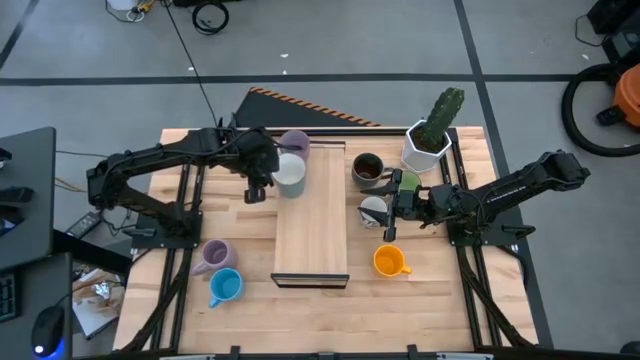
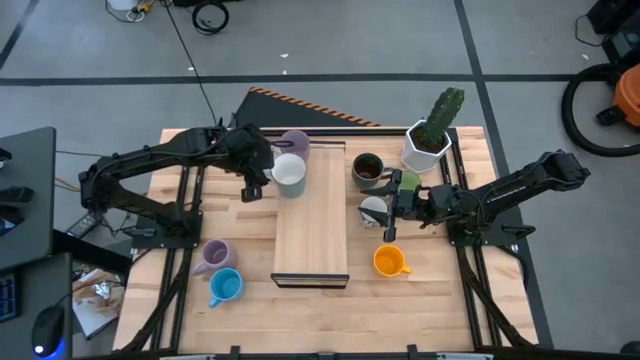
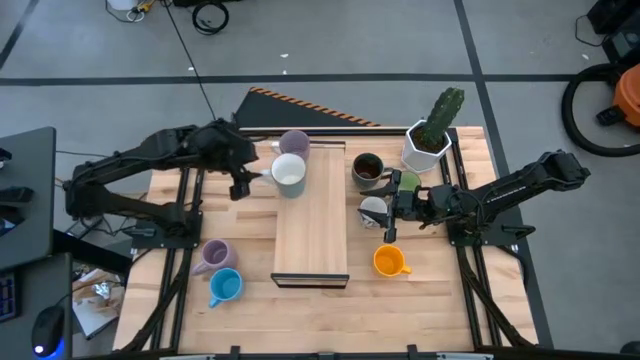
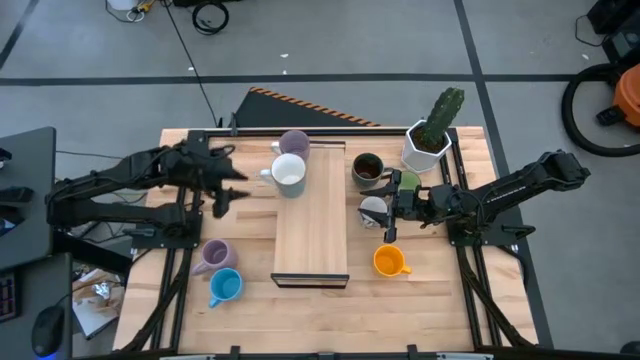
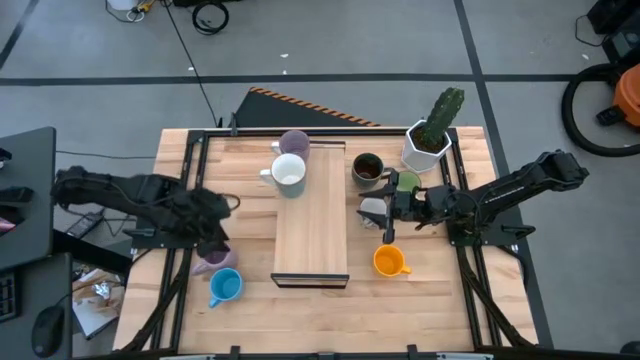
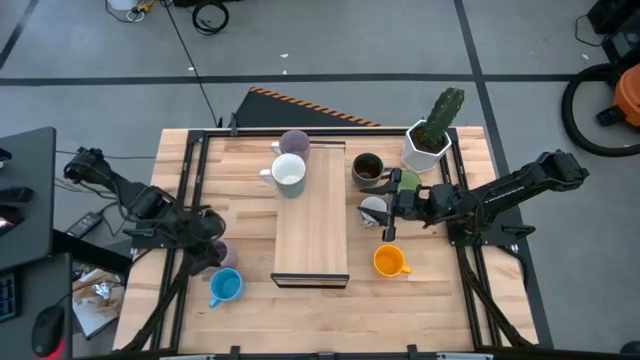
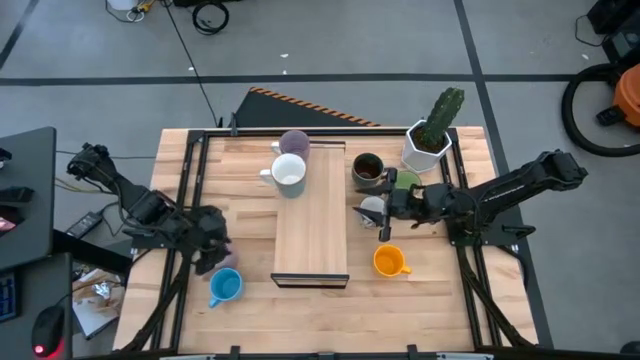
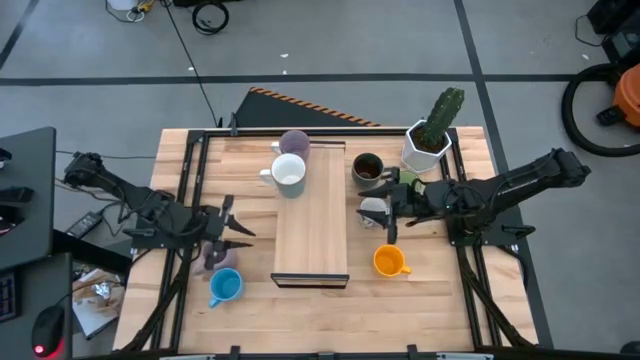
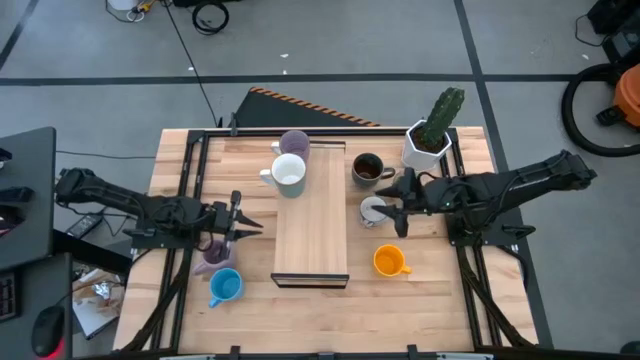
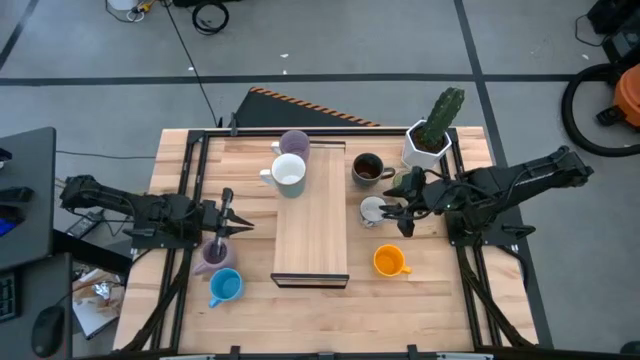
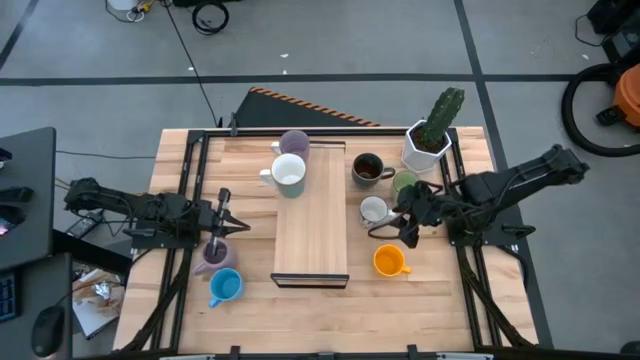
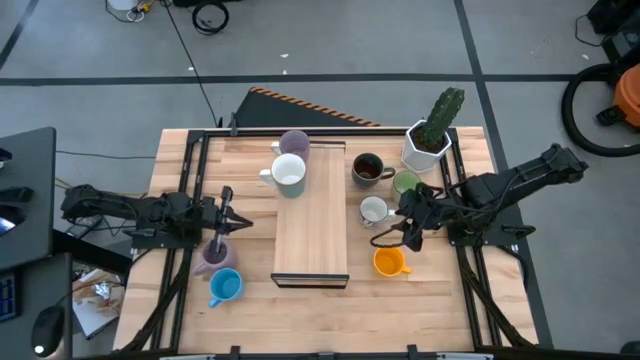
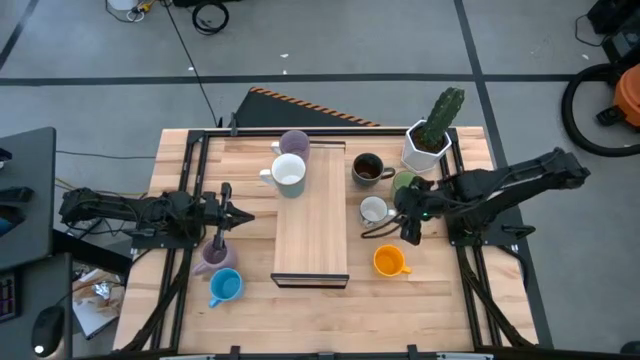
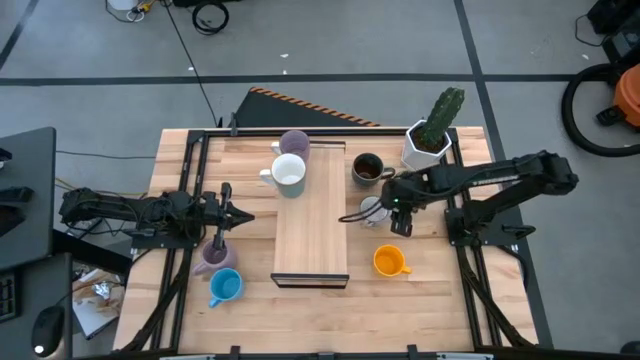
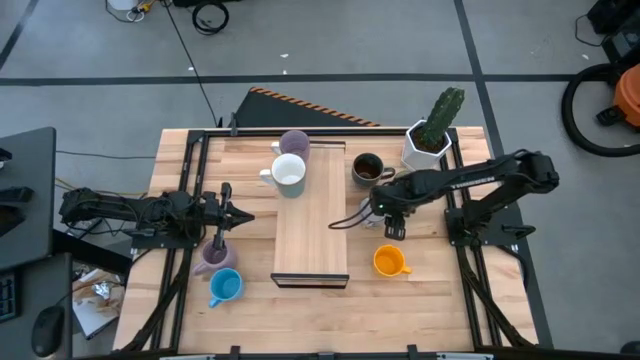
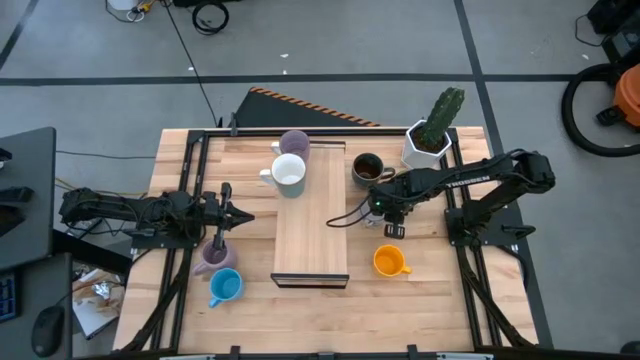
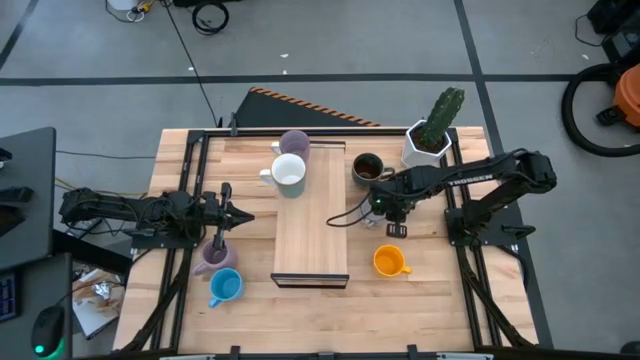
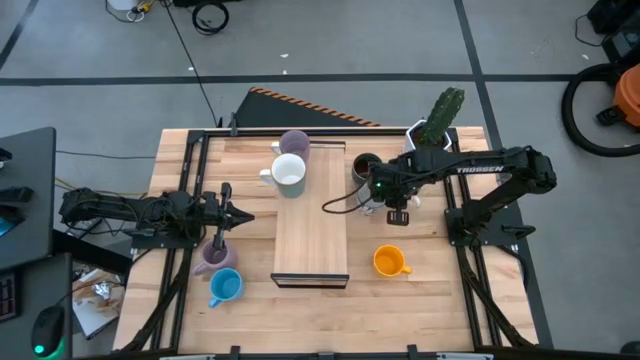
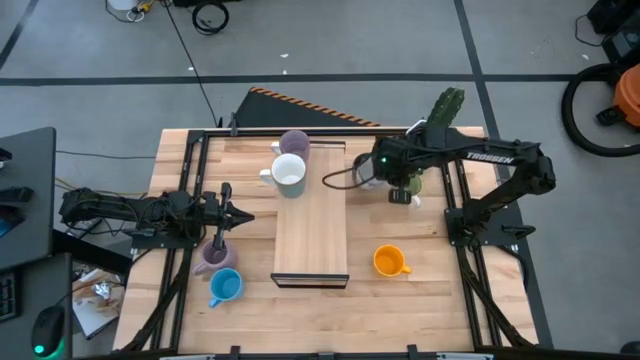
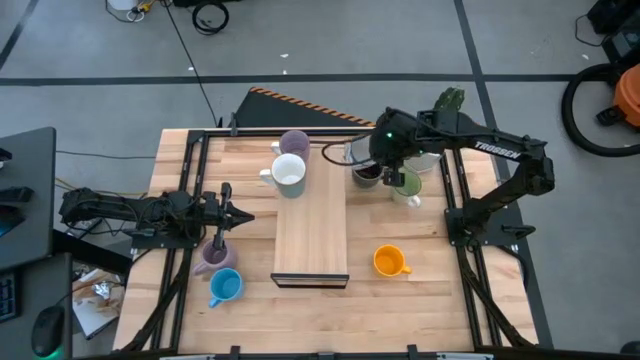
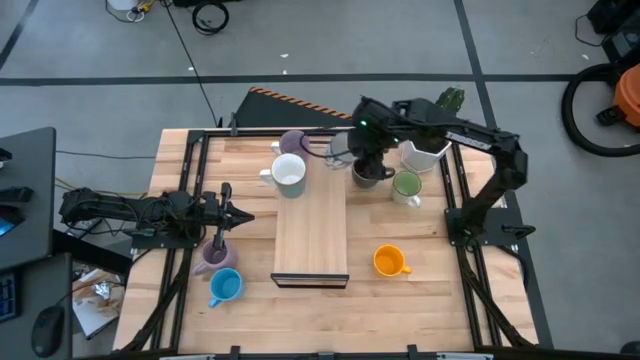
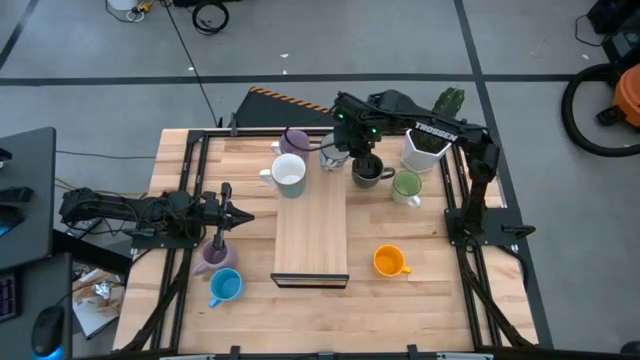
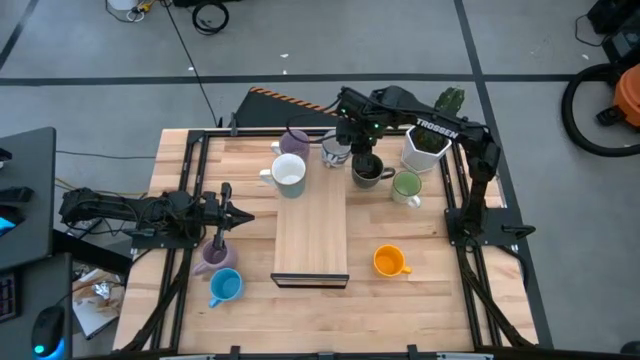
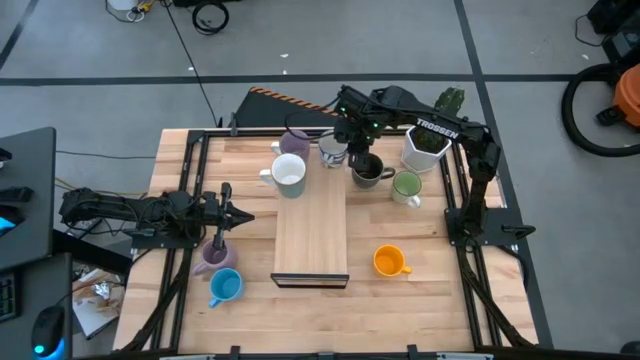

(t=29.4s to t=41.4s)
Task: Place coffee mugs
Put the blue patterned mug on the shelf

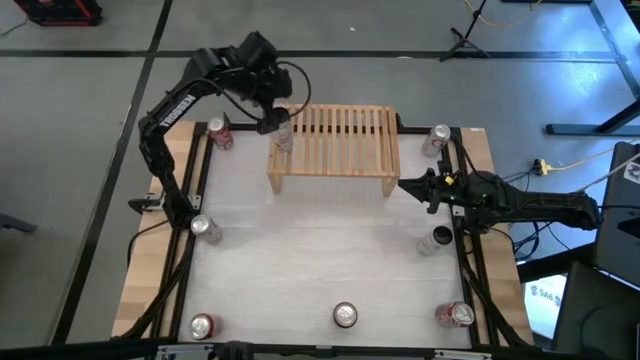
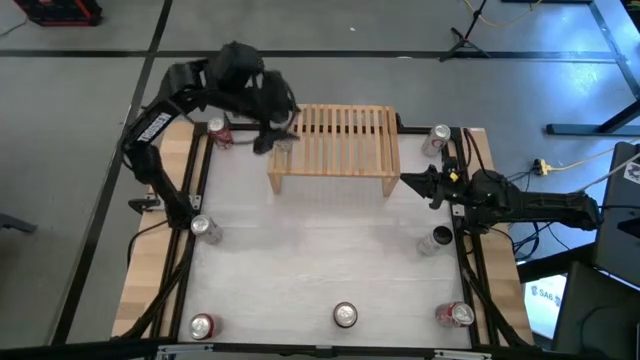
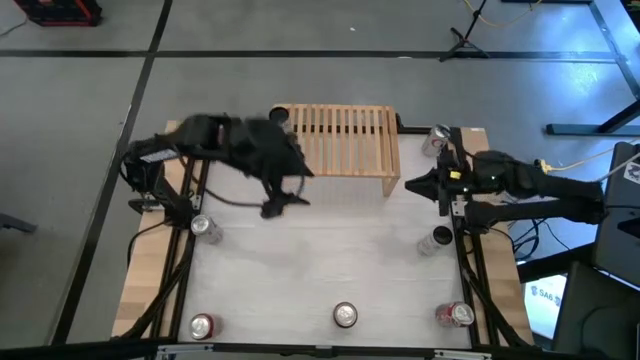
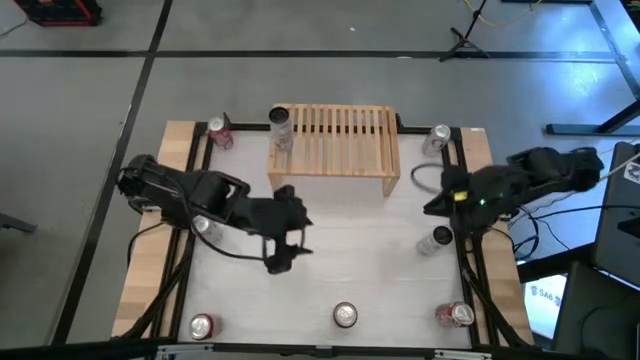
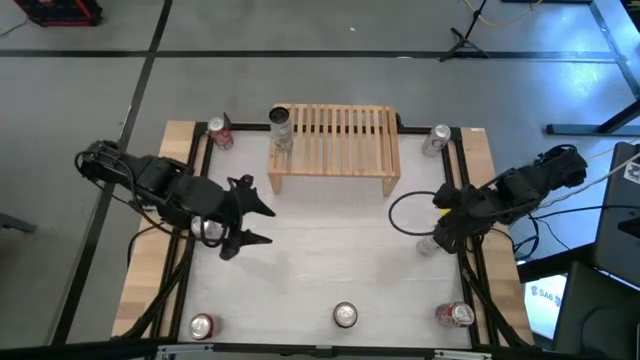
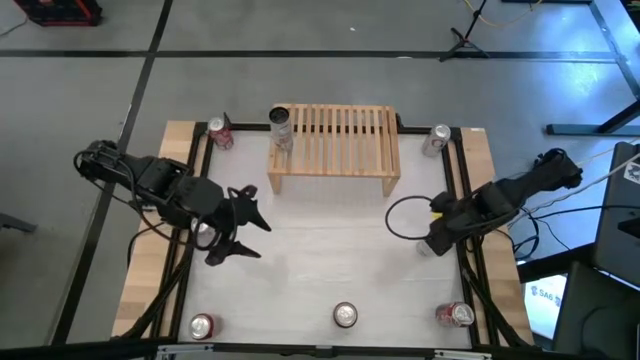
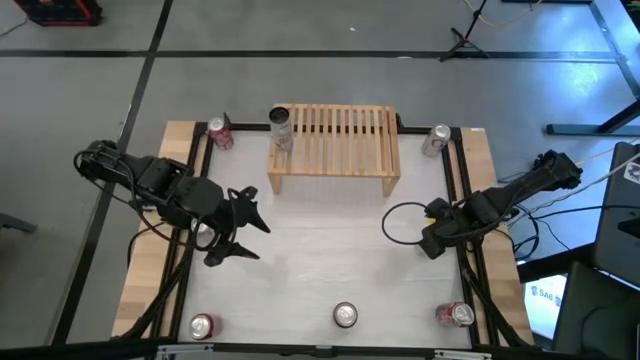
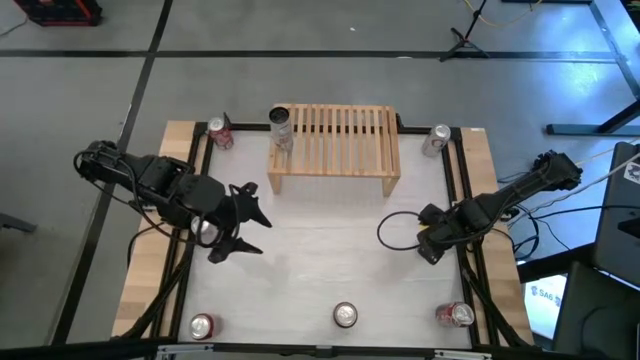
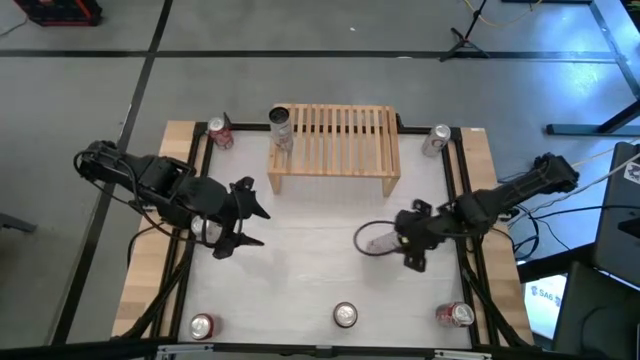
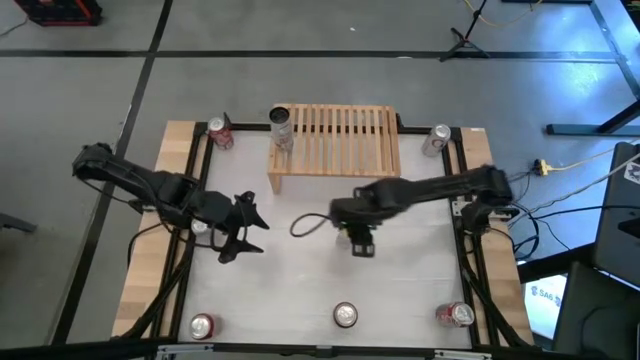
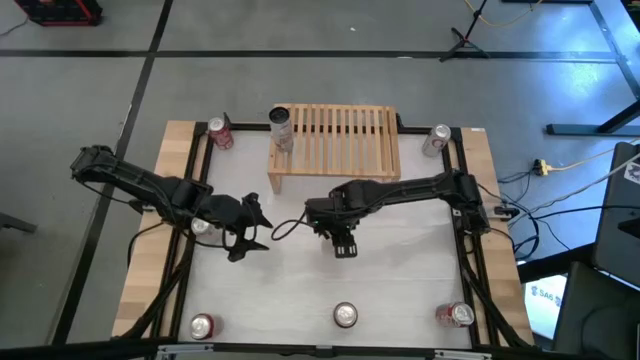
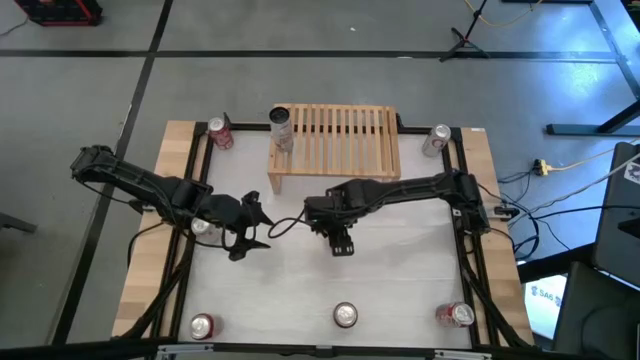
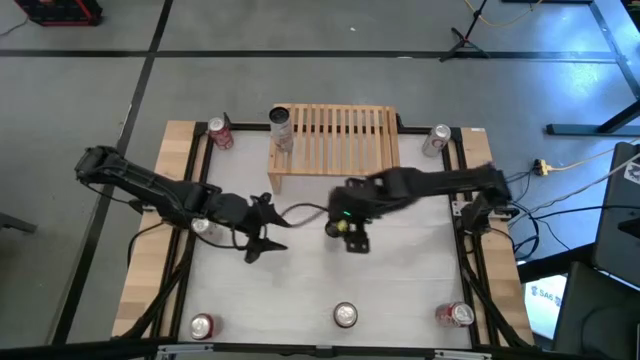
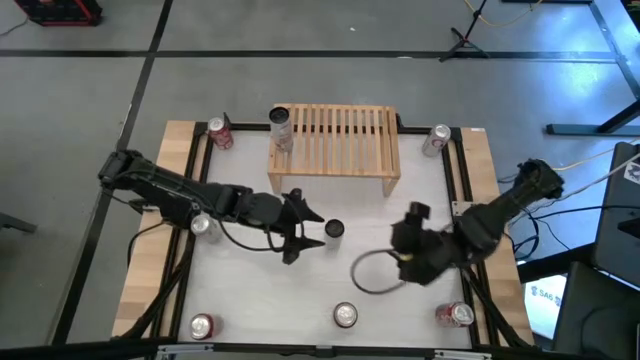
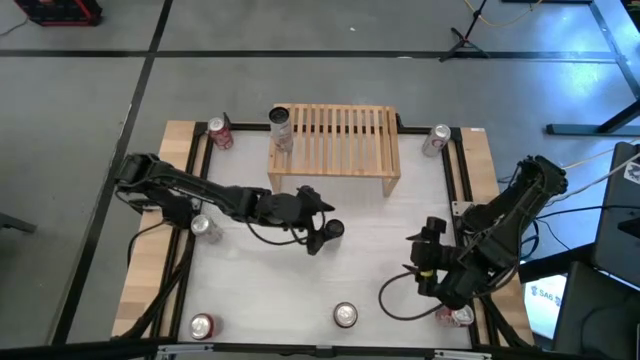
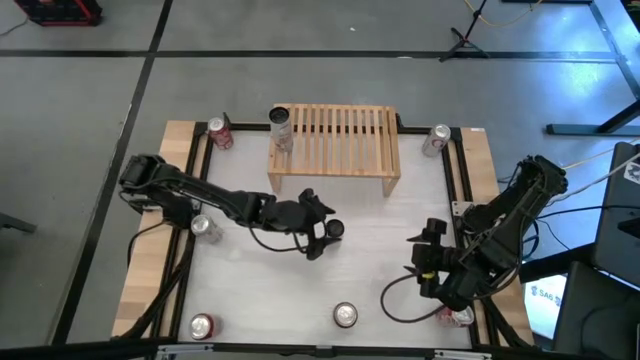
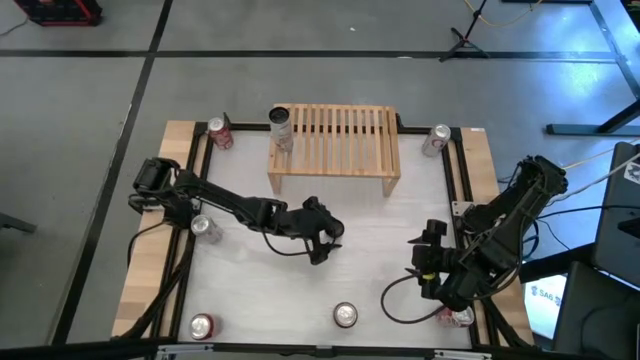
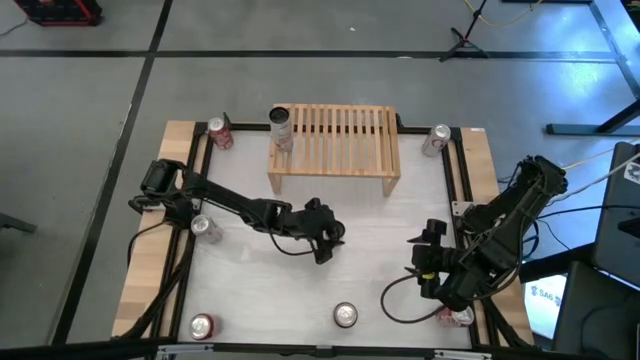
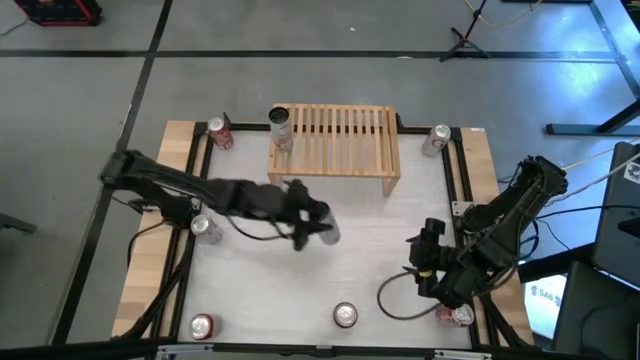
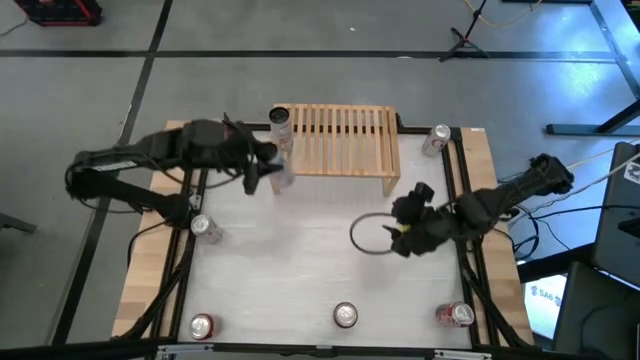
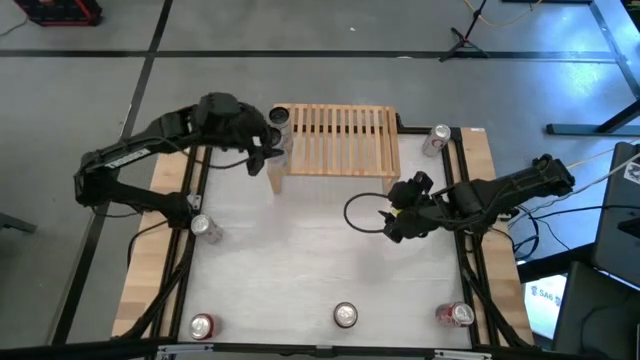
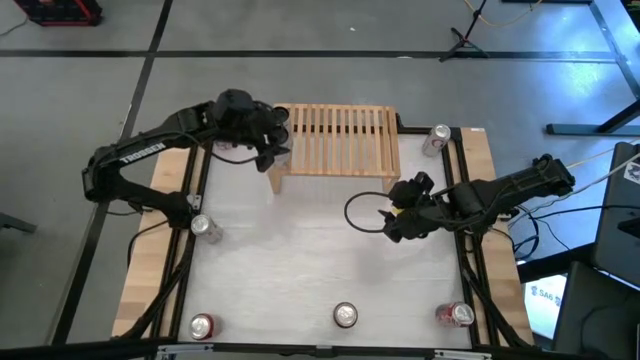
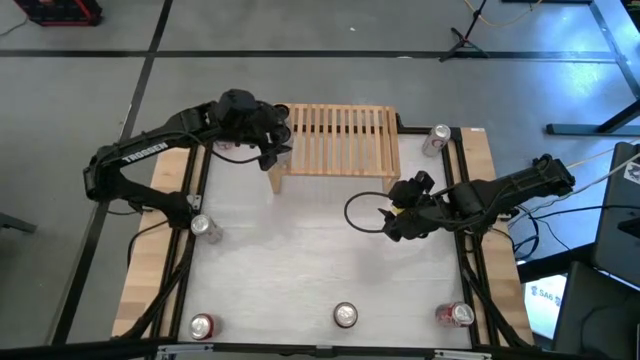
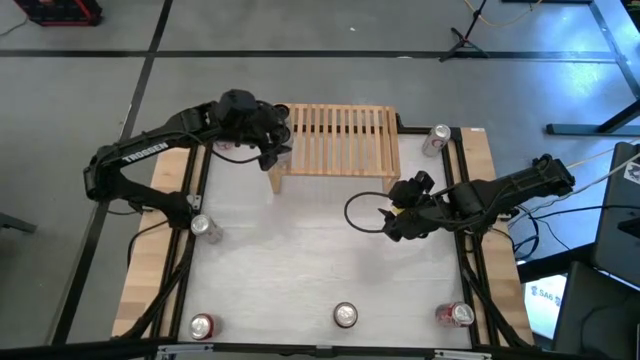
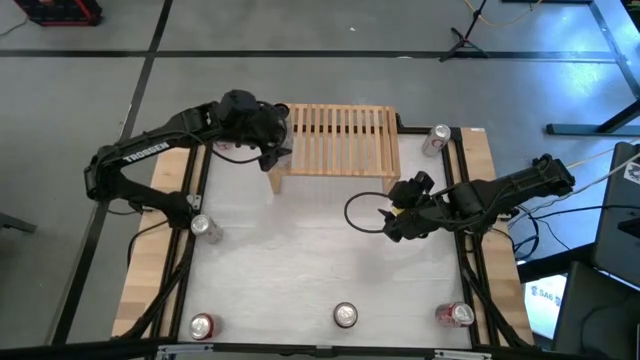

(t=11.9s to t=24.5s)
Task: Place canned beverage on shelf
Put the white soda can on the shelf
